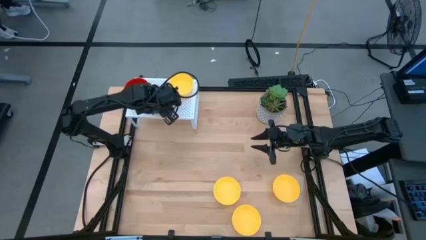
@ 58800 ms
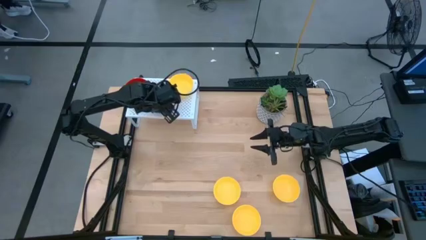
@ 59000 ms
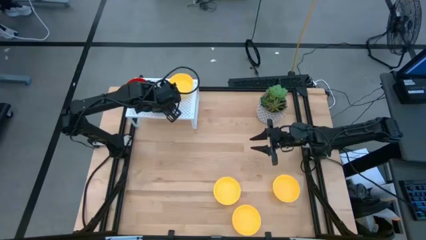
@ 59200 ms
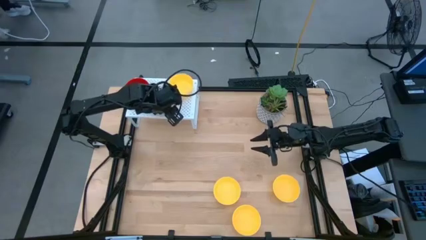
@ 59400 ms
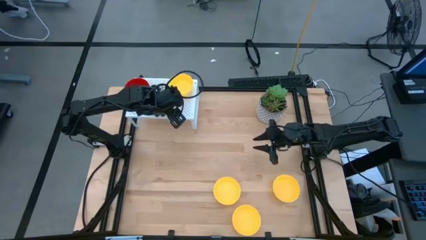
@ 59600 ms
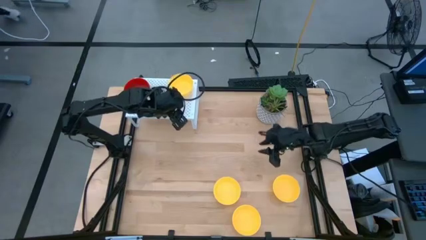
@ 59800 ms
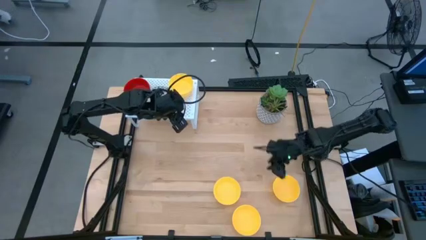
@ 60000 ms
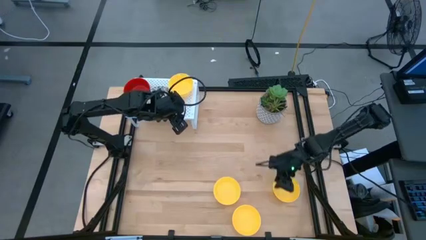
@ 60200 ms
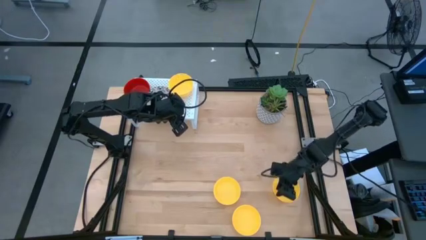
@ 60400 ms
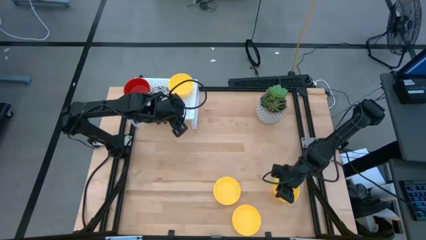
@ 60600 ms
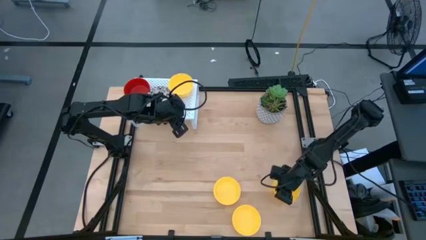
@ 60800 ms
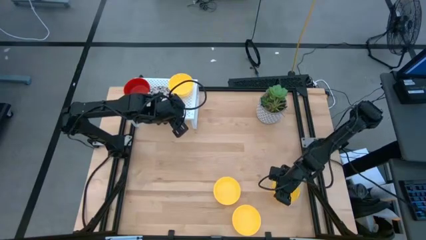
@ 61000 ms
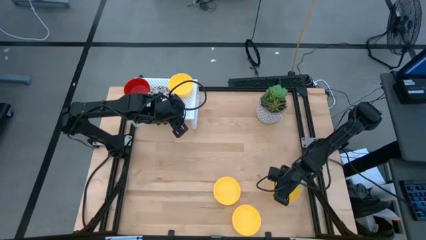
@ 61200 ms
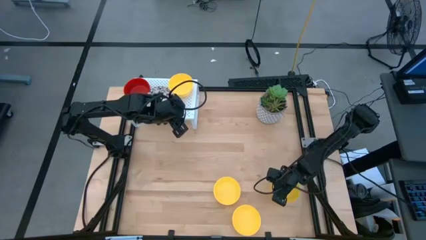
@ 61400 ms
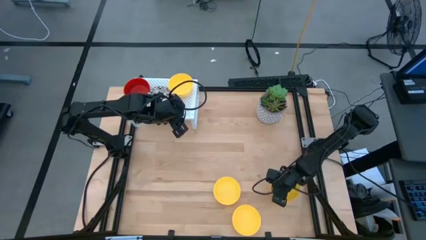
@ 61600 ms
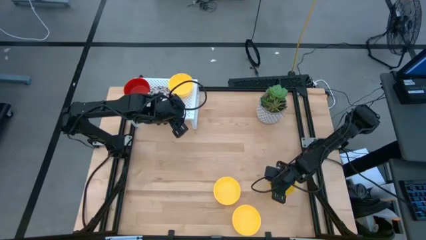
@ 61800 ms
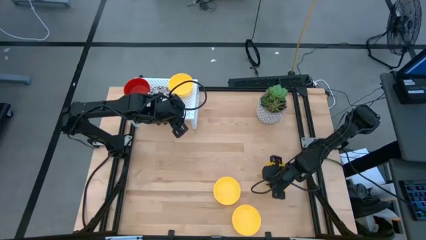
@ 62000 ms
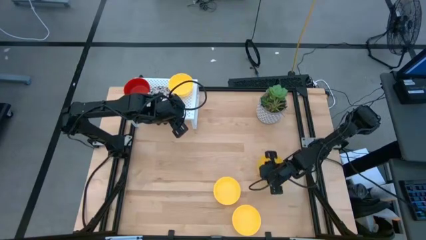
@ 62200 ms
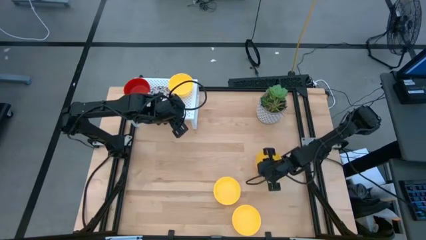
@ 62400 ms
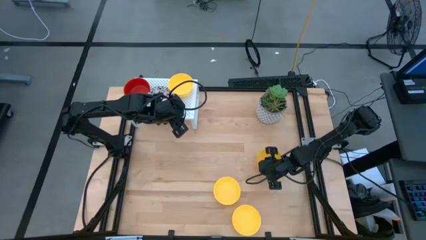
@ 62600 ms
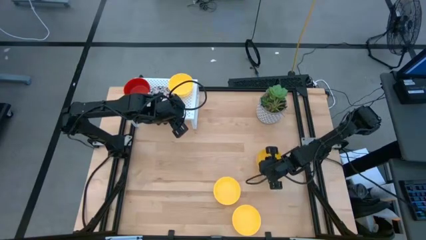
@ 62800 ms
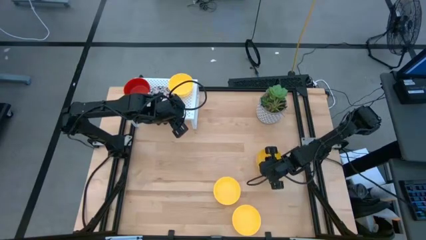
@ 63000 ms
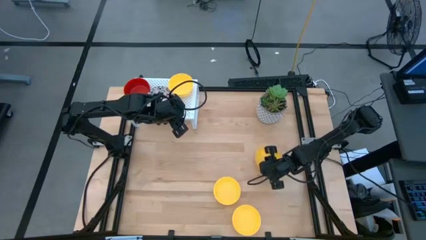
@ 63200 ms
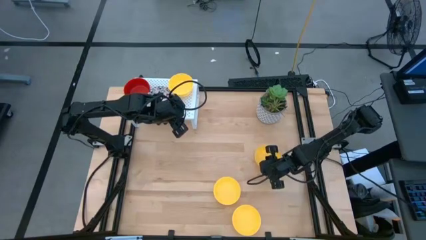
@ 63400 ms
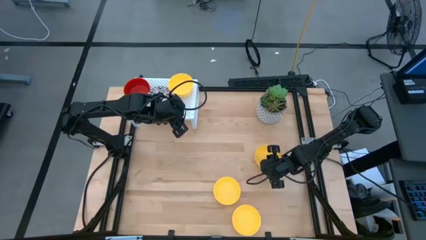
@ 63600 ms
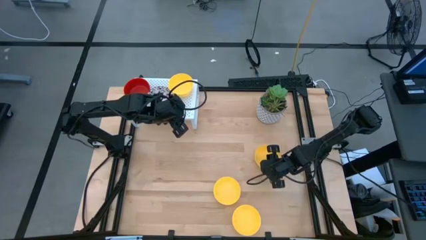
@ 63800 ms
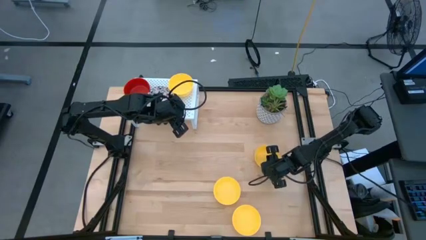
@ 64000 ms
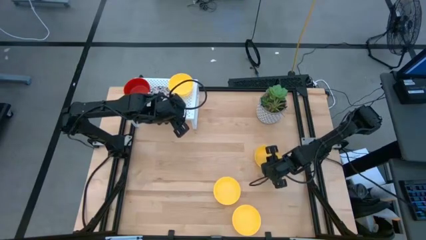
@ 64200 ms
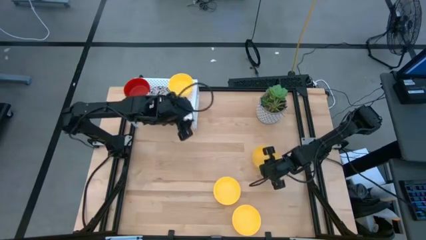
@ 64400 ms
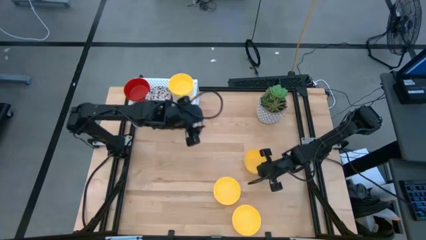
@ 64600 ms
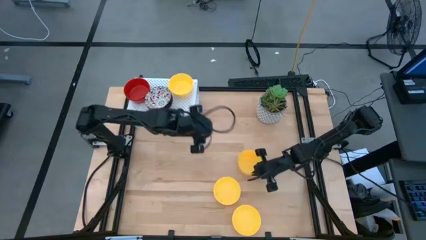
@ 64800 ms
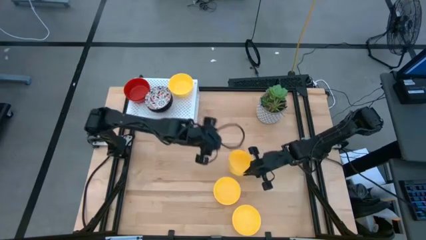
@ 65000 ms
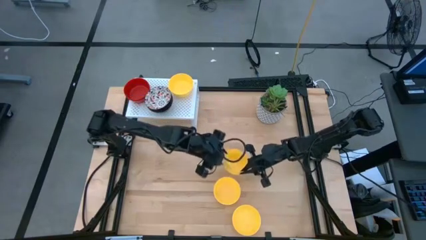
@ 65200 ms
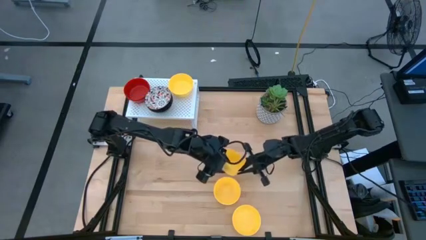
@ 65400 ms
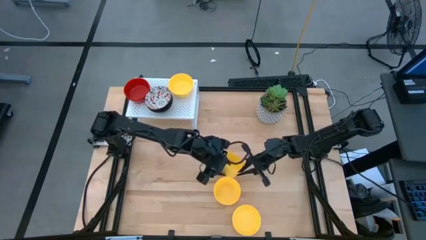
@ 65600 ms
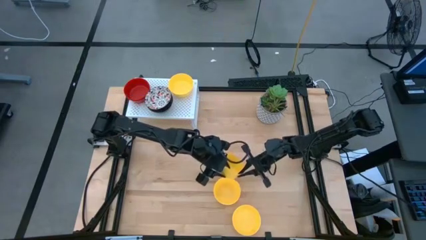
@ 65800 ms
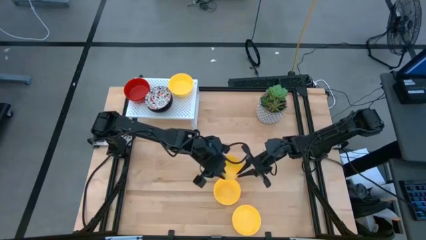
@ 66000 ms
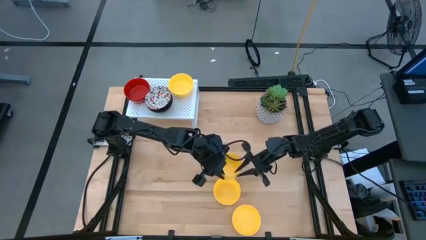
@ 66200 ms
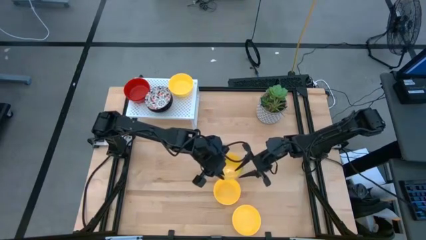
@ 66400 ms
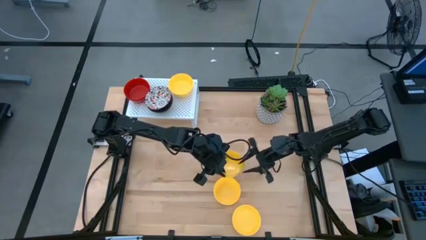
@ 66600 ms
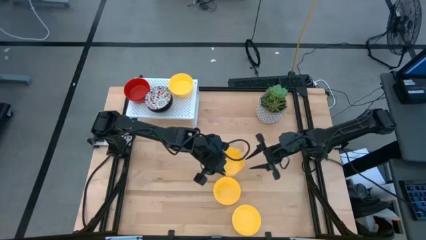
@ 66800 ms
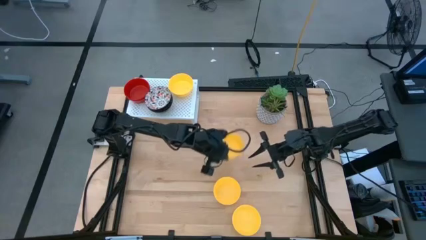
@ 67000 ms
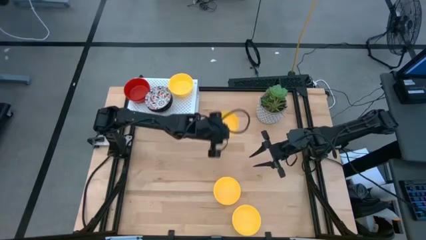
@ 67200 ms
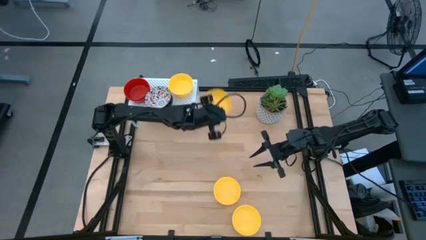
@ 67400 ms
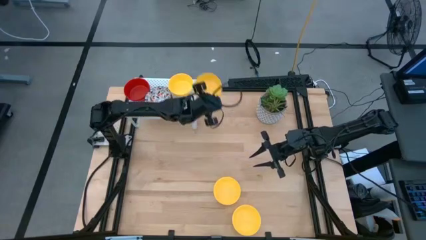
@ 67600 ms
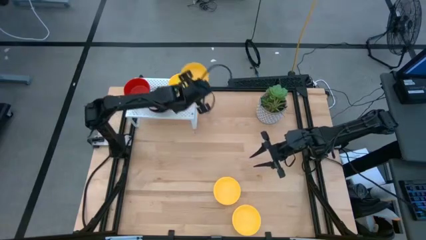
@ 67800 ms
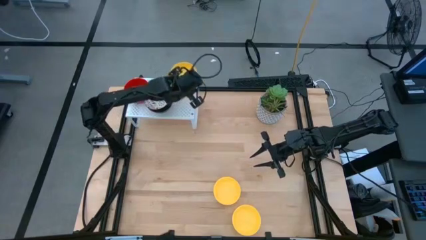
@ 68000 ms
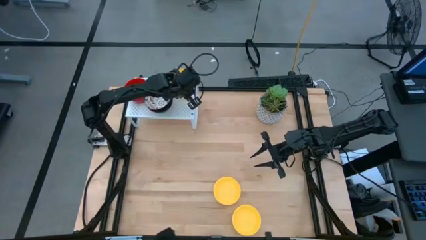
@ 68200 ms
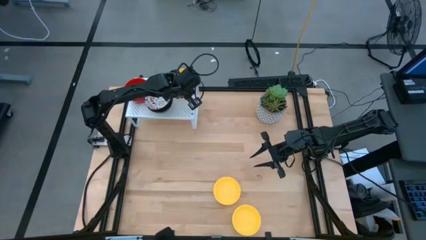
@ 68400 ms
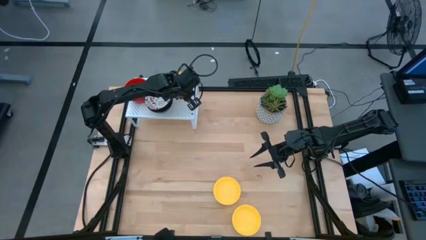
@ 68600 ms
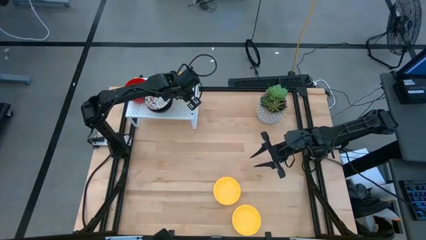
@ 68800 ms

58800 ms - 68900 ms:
Task: Pick & Place Mini bowls
Stack the yellow bowl on top of the yellow bowl on the shelf

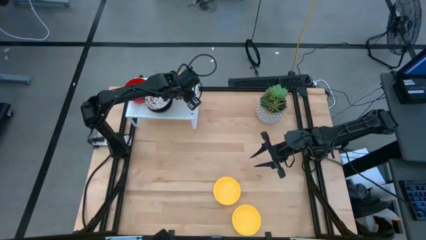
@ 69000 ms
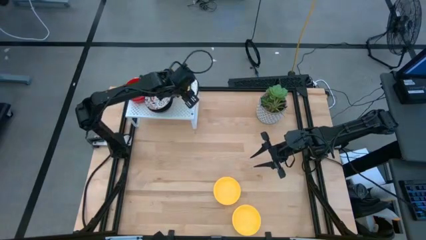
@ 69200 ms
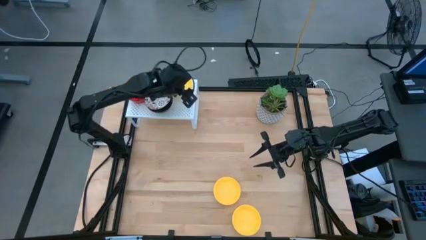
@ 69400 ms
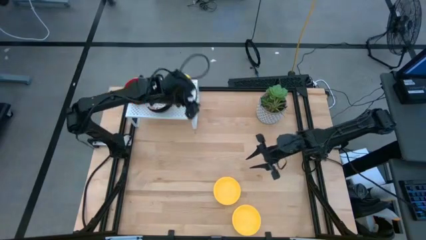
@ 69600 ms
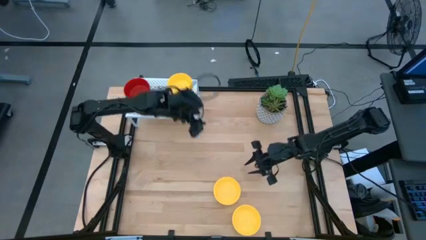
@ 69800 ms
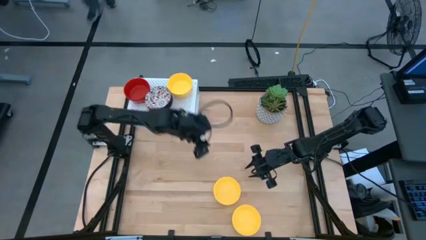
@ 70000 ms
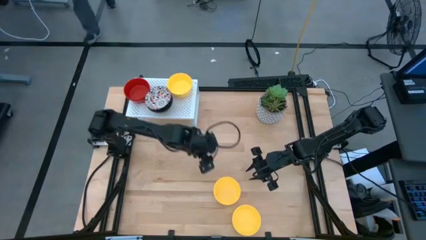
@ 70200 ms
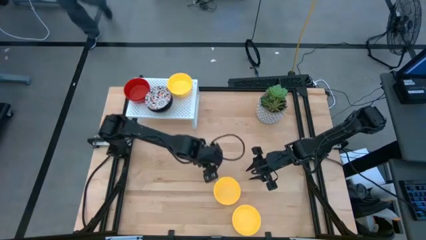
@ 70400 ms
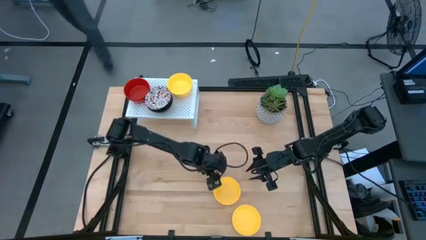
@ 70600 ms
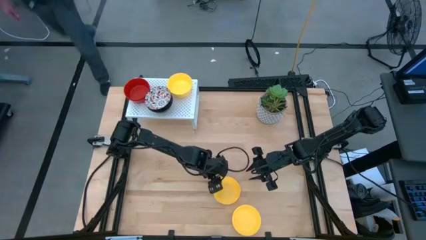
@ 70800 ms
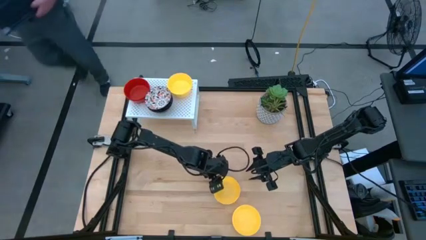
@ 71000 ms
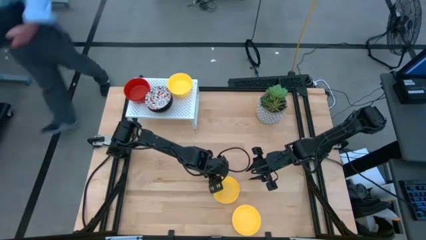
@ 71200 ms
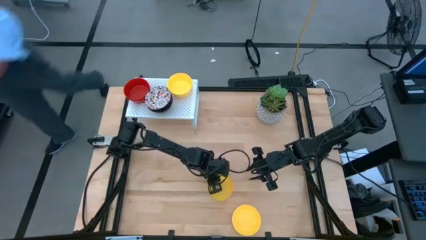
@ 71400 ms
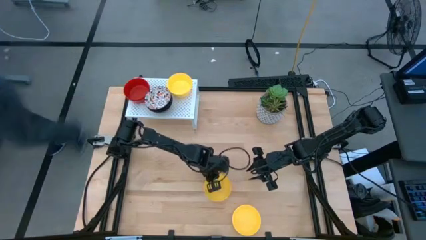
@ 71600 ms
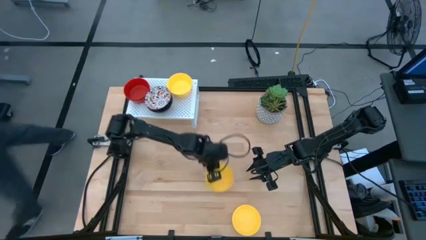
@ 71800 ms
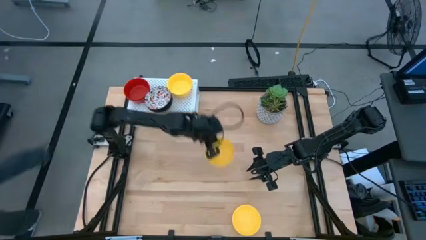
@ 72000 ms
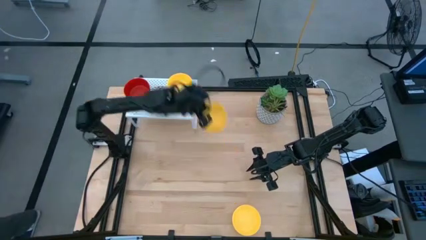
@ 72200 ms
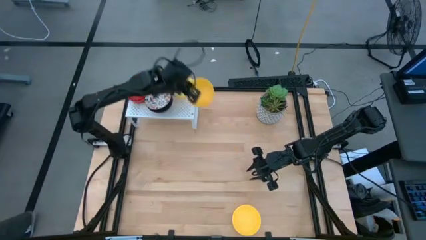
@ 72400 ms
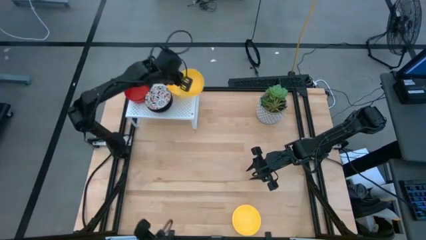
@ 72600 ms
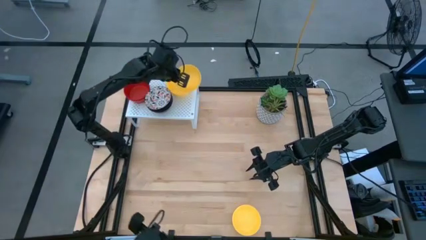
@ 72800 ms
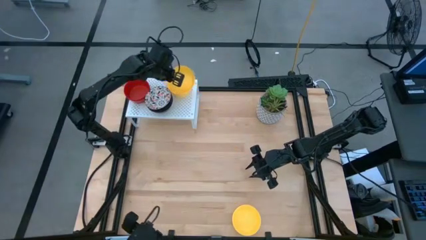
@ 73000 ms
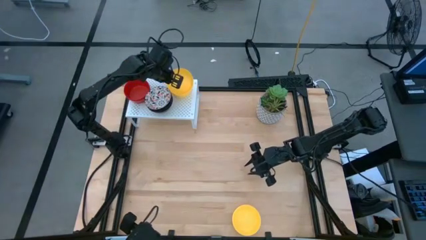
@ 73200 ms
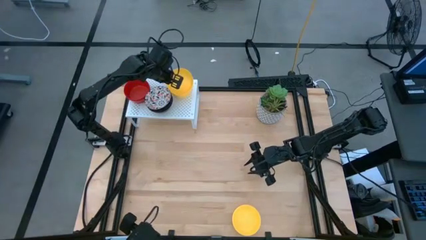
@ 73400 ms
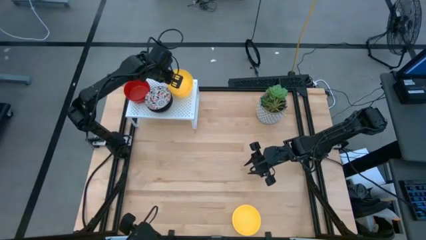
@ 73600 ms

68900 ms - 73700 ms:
Stack the yellow bowl on top of the yellow bowl on the shelf
